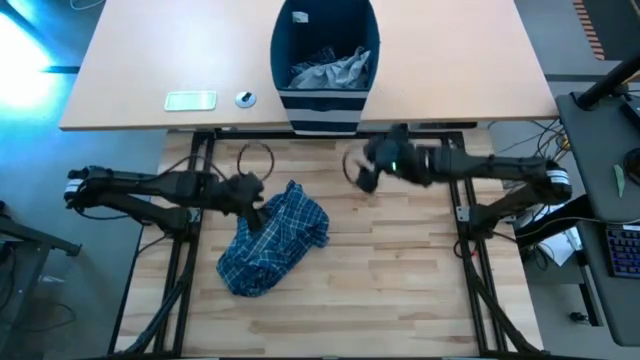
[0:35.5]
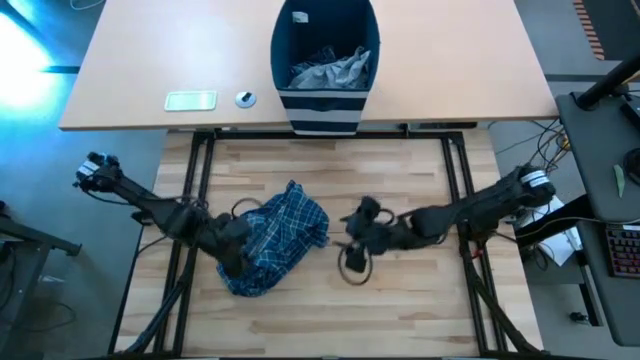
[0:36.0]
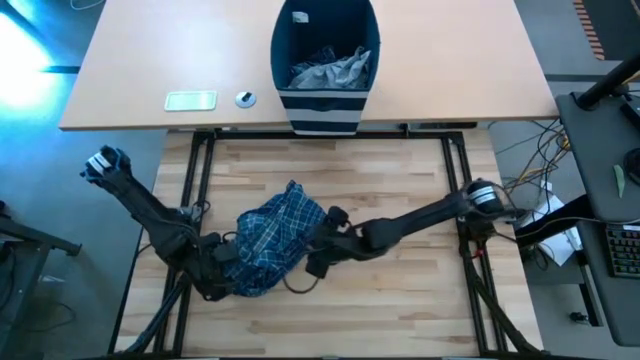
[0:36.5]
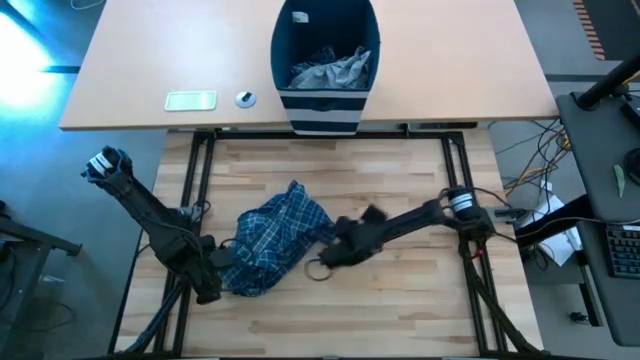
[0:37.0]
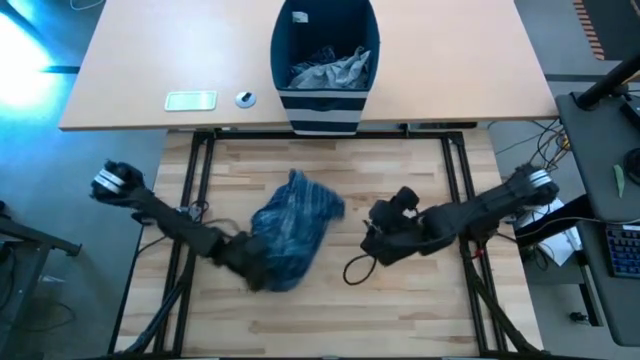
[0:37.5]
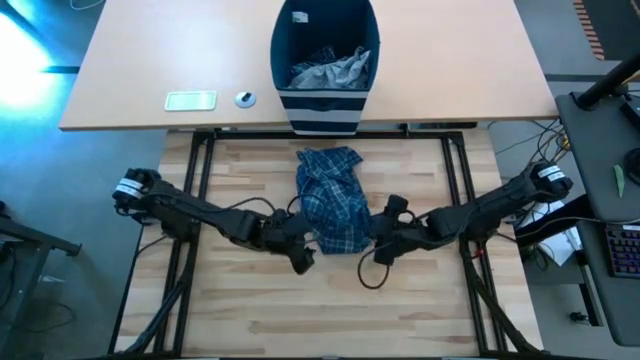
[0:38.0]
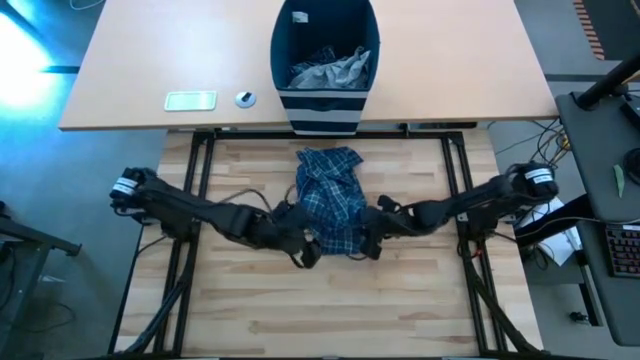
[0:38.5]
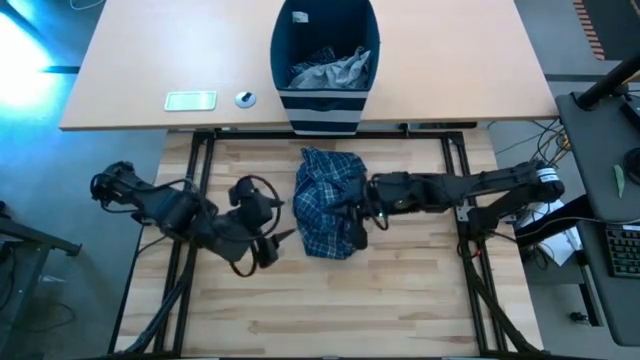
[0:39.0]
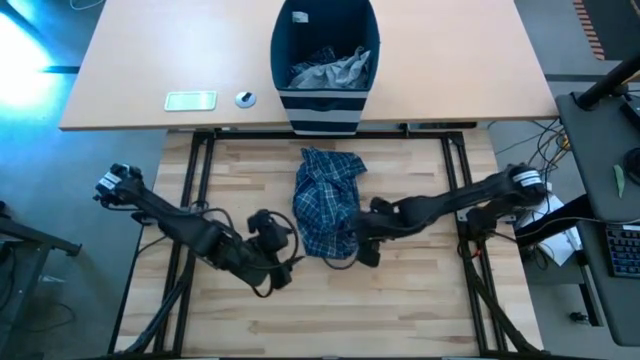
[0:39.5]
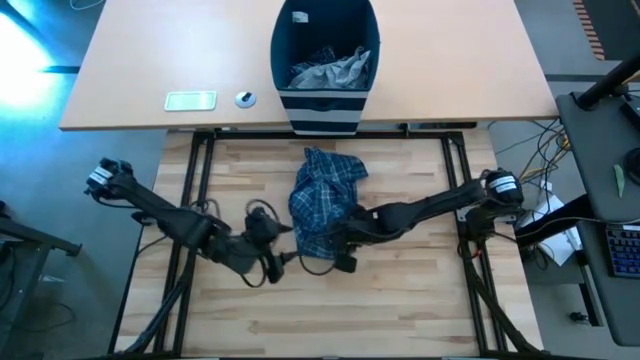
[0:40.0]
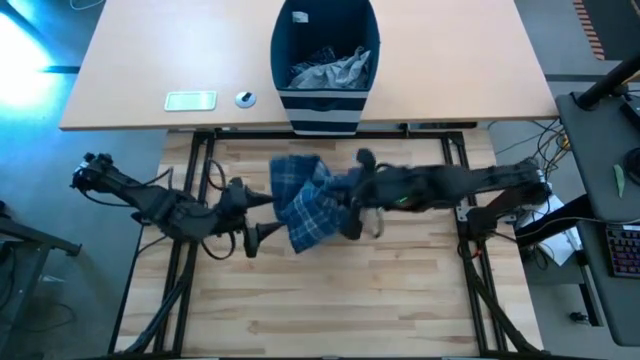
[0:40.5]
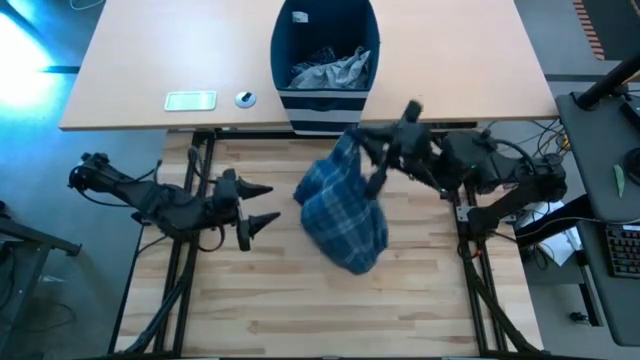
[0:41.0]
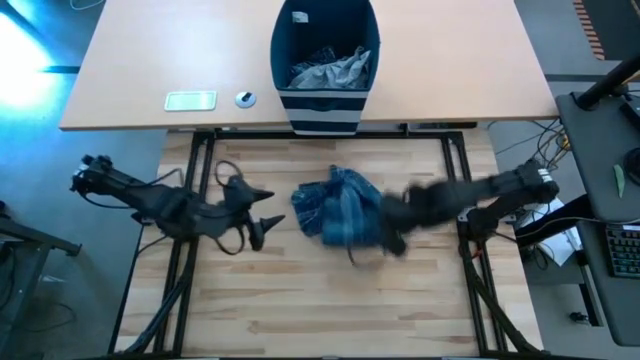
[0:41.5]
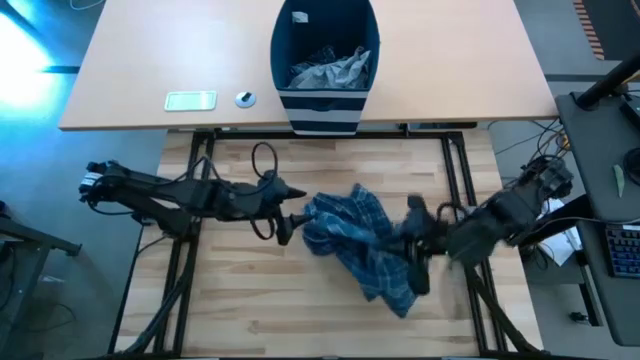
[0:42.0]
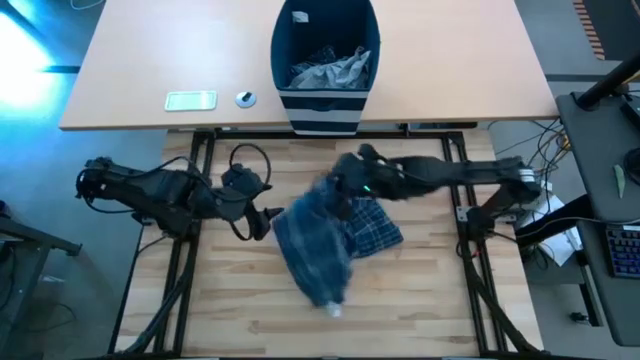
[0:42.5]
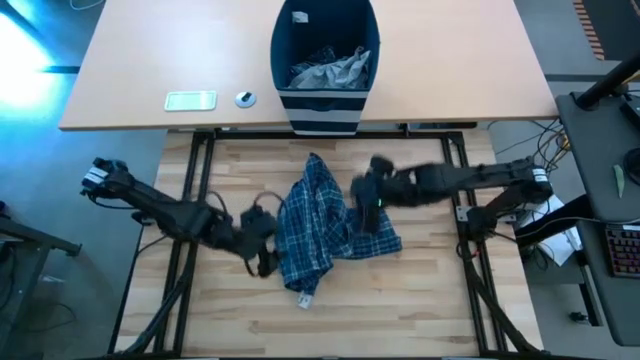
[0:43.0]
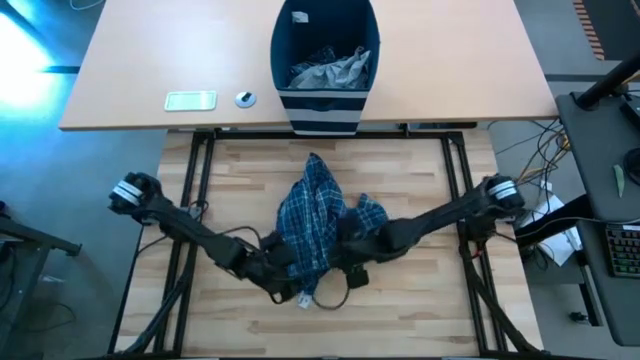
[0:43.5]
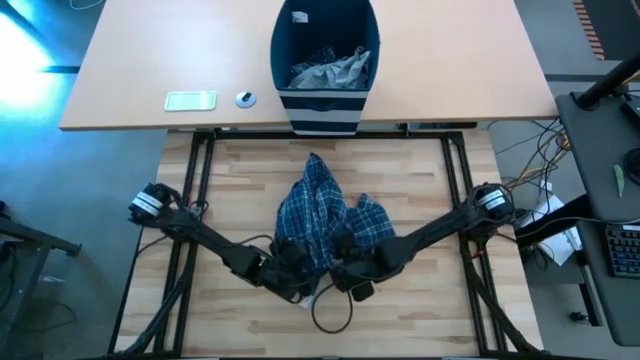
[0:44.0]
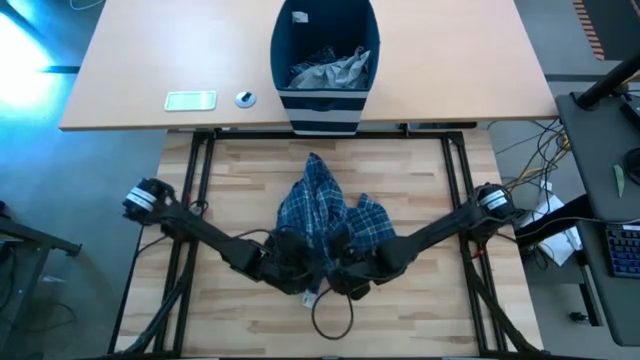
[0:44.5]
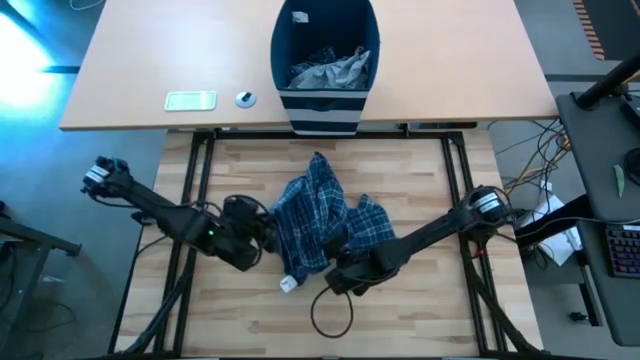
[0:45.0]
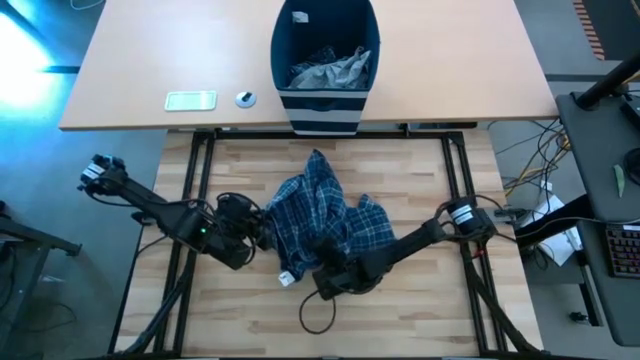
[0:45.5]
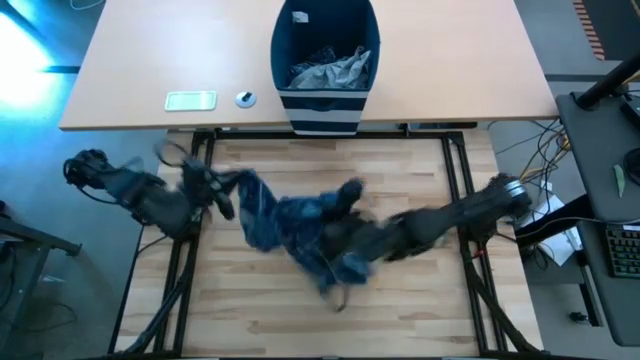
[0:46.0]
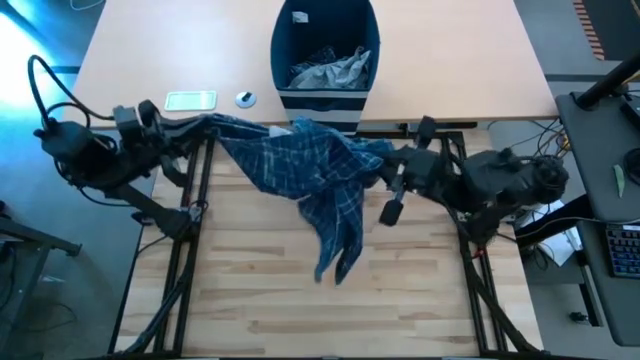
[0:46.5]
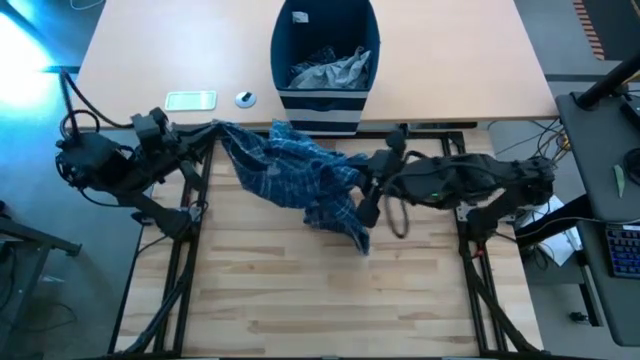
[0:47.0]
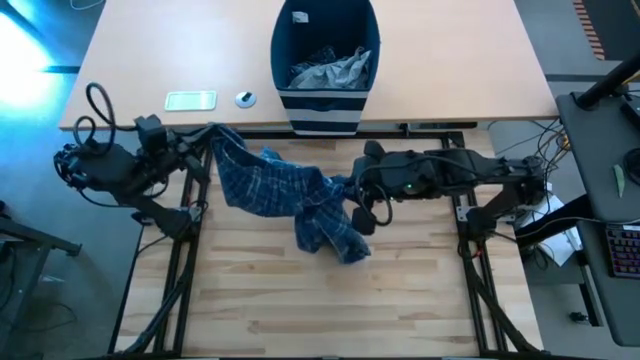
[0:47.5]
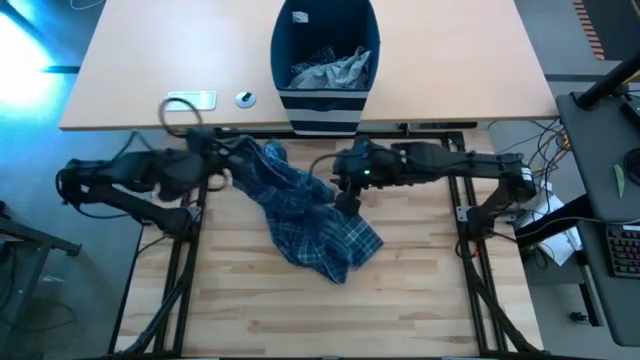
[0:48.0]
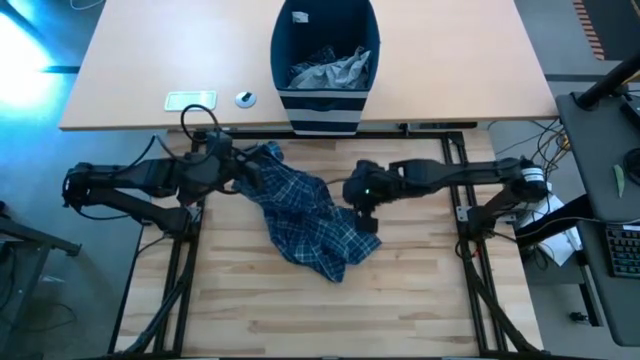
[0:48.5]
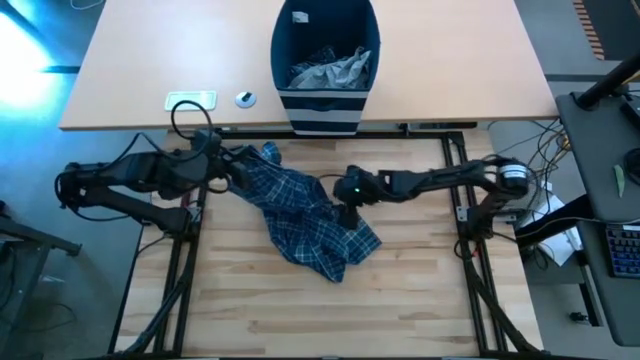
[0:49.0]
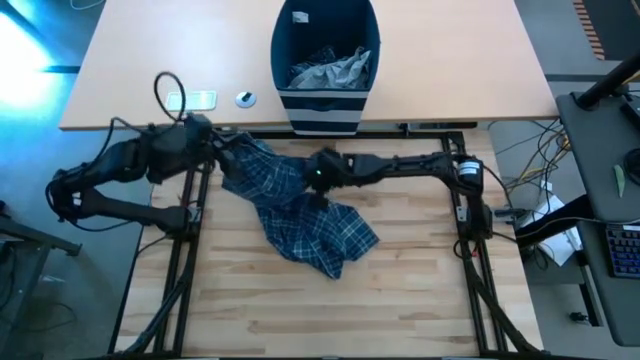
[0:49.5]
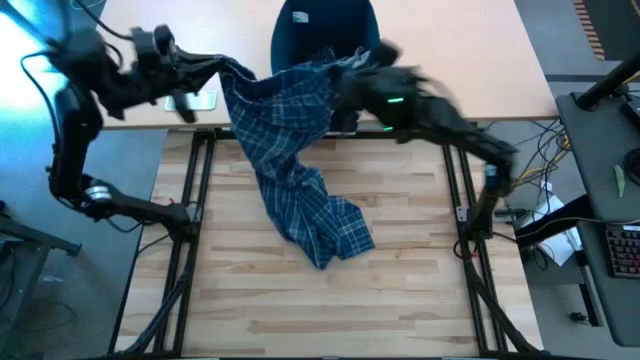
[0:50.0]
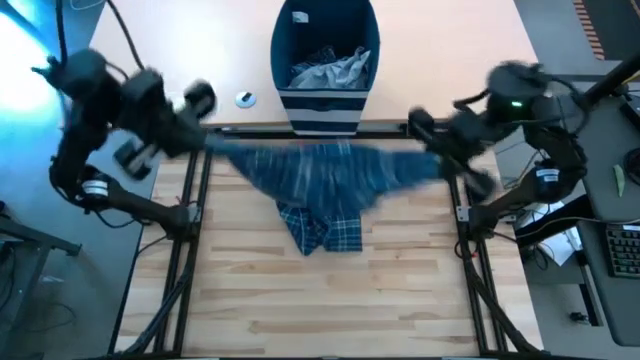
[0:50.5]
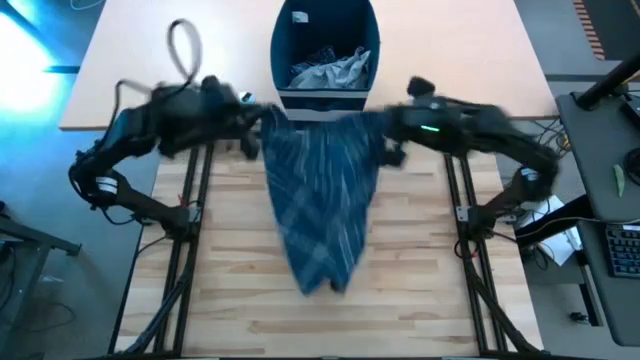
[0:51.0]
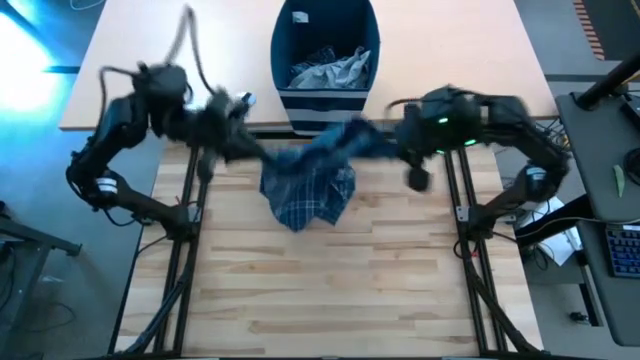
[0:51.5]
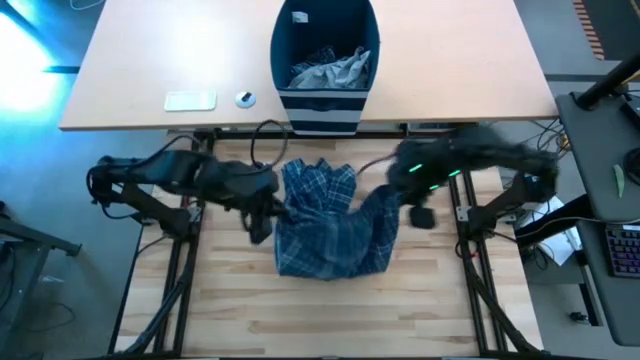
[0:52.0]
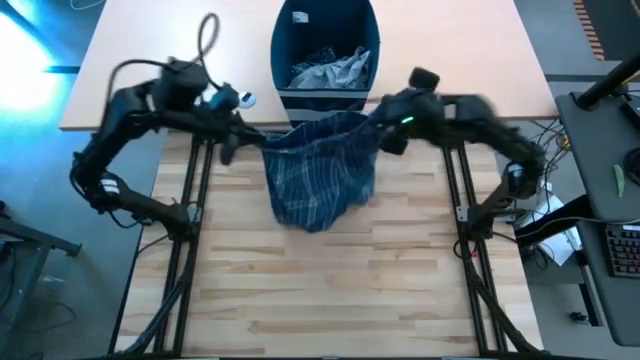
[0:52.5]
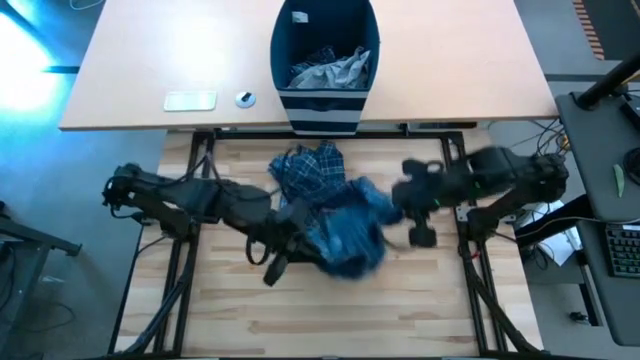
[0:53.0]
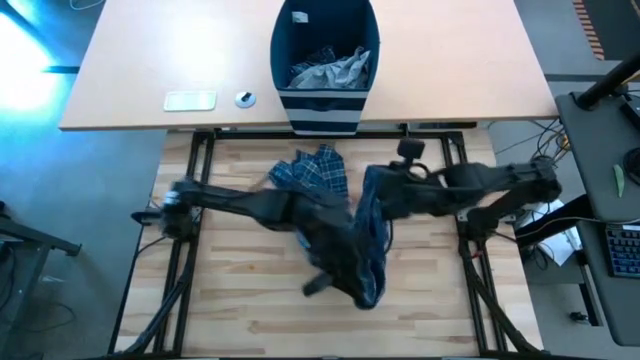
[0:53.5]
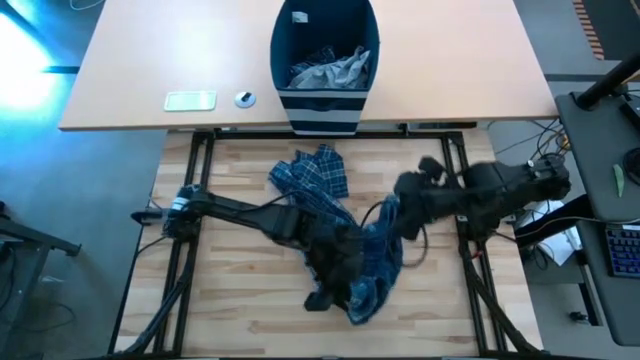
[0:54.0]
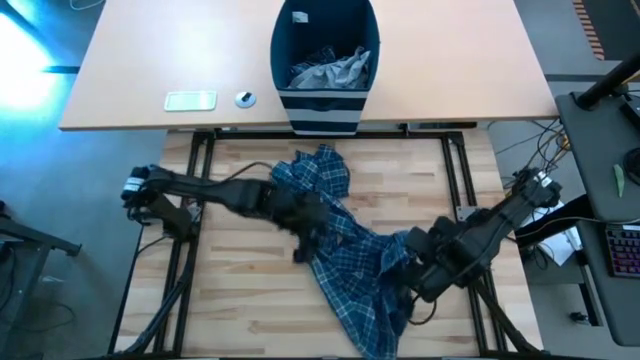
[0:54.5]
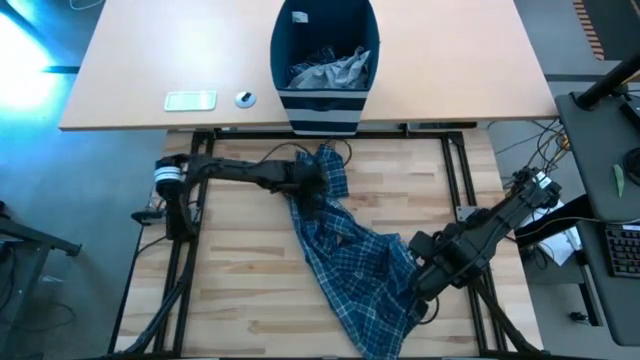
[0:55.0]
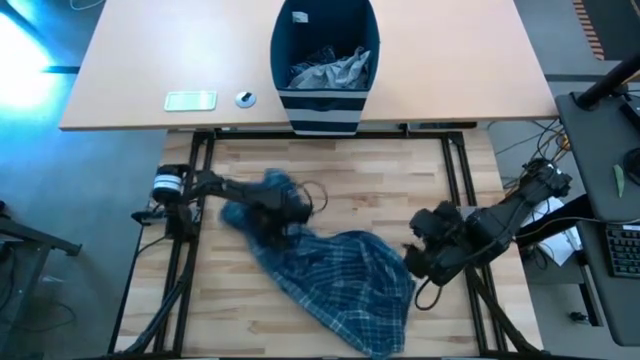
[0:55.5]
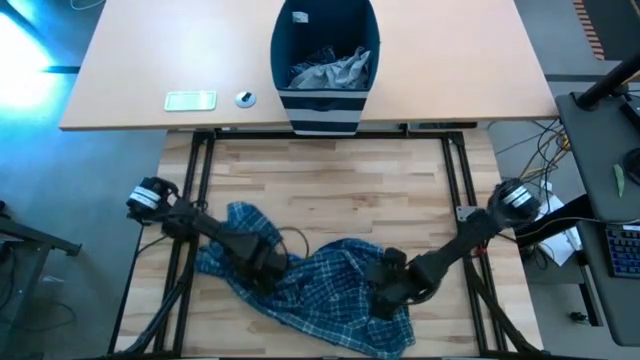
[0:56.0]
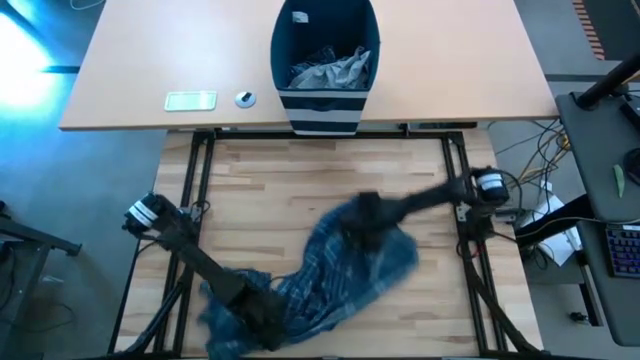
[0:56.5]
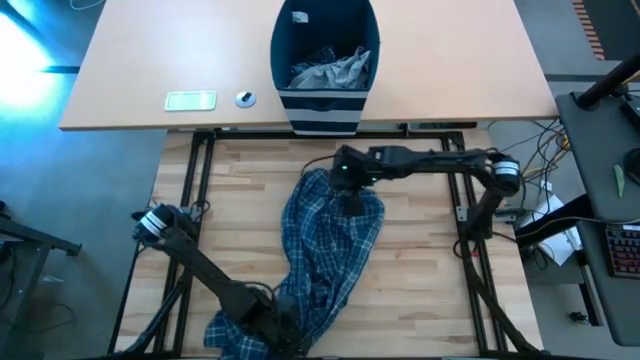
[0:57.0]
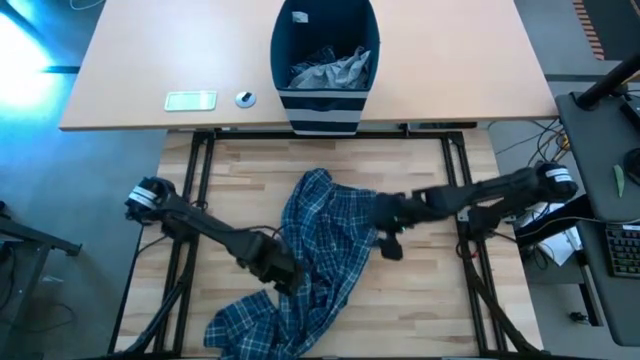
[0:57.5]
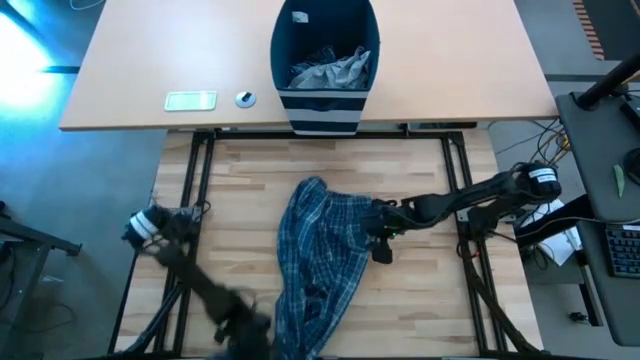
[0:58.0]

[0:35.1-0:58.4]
Task: Fold Laundry from Bin
Fold the blue patterned pants
